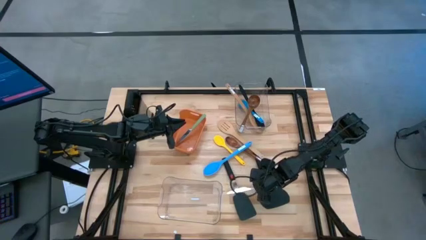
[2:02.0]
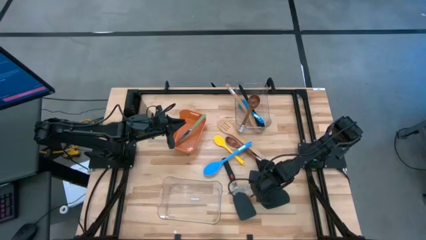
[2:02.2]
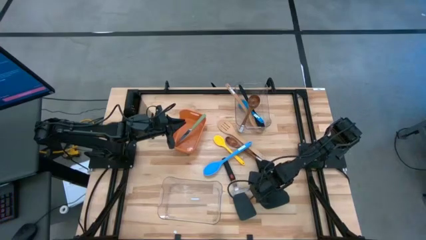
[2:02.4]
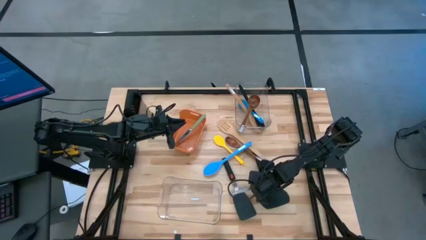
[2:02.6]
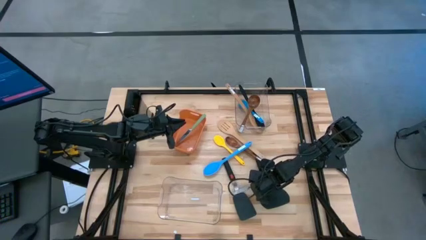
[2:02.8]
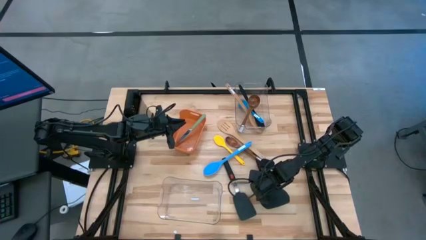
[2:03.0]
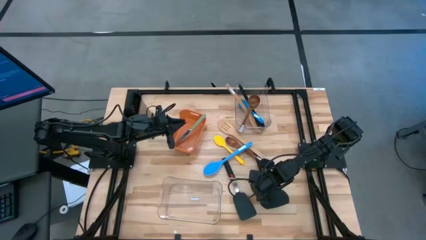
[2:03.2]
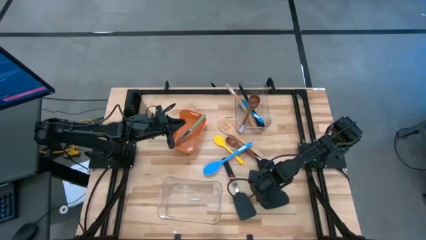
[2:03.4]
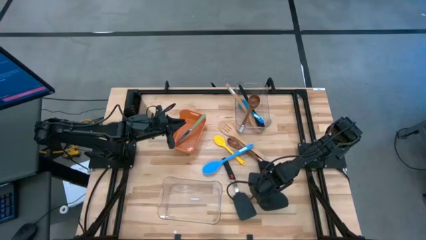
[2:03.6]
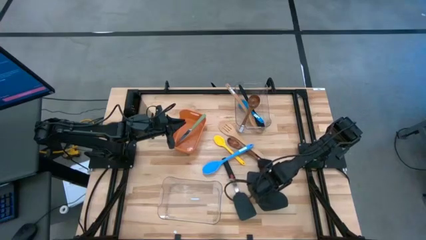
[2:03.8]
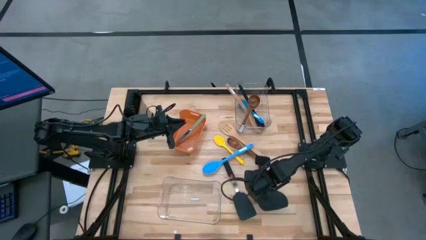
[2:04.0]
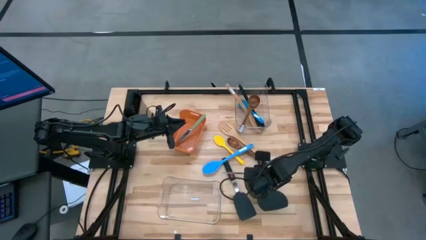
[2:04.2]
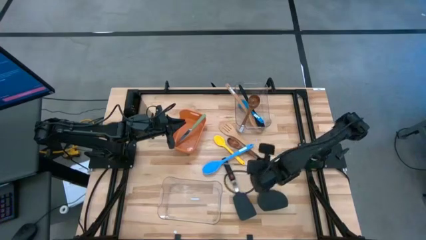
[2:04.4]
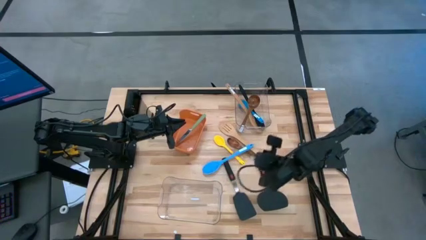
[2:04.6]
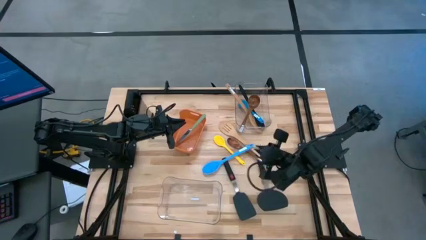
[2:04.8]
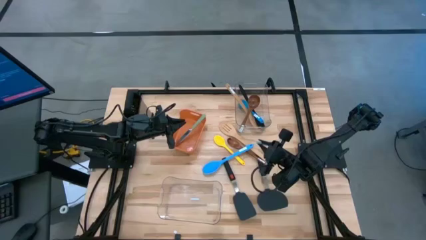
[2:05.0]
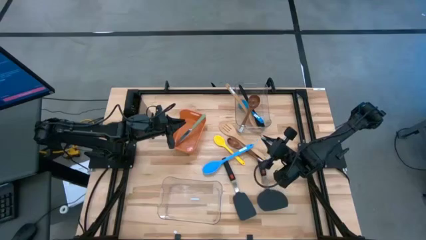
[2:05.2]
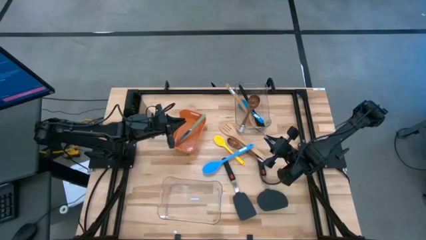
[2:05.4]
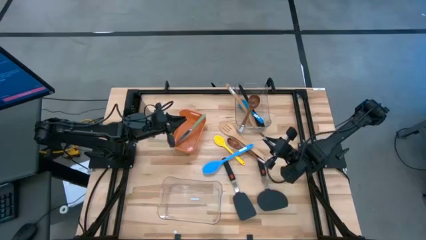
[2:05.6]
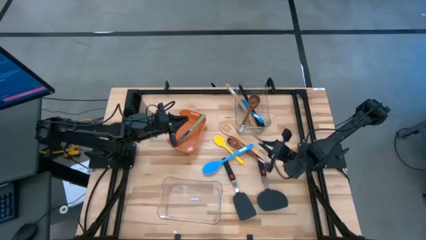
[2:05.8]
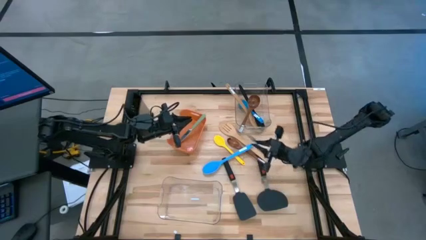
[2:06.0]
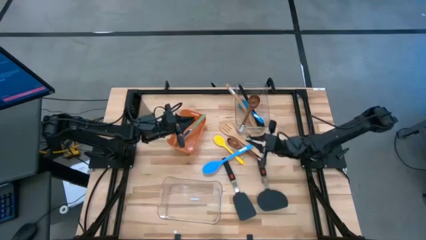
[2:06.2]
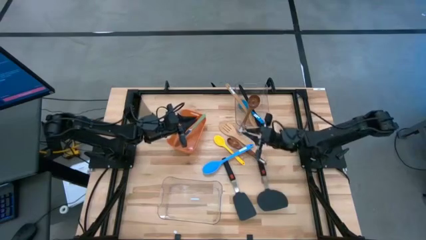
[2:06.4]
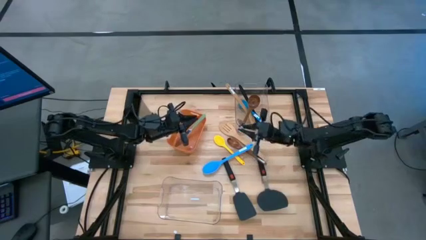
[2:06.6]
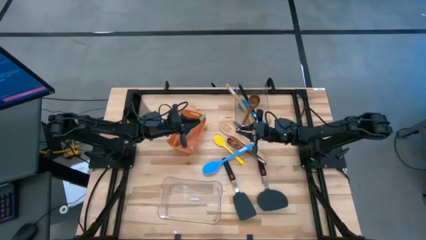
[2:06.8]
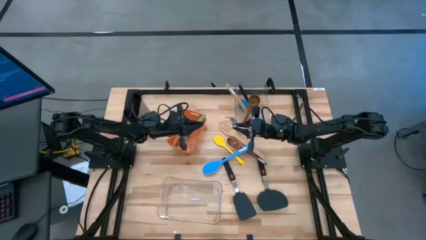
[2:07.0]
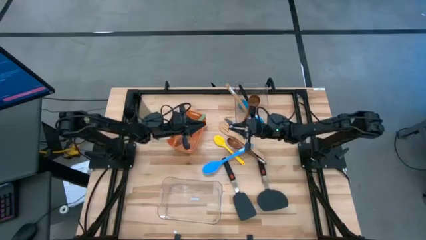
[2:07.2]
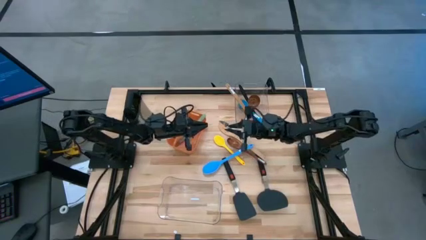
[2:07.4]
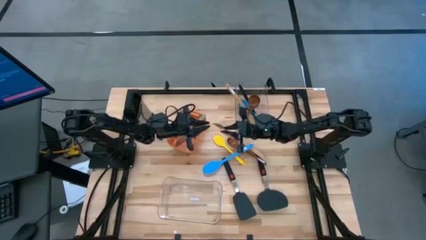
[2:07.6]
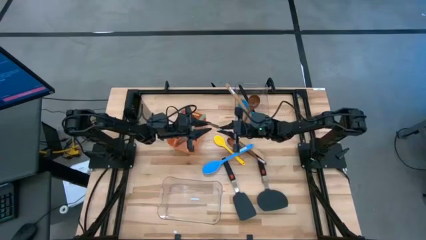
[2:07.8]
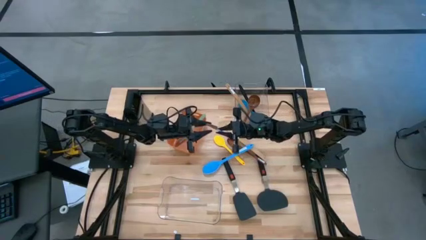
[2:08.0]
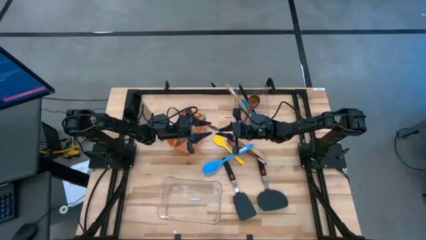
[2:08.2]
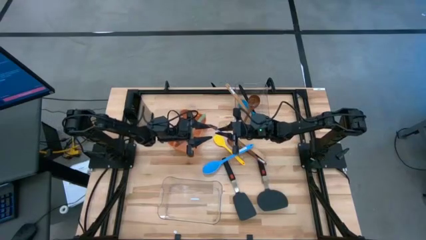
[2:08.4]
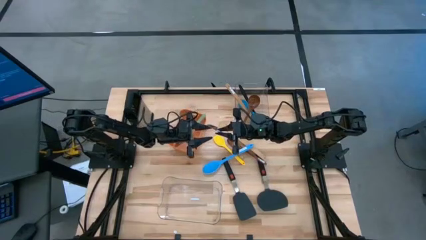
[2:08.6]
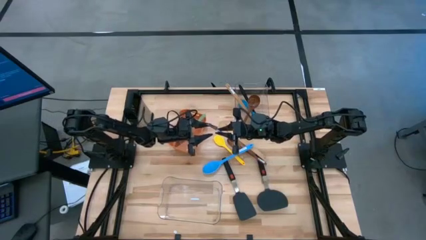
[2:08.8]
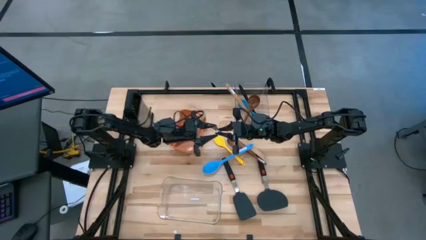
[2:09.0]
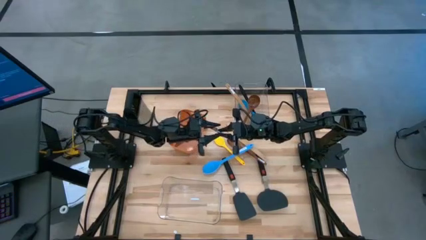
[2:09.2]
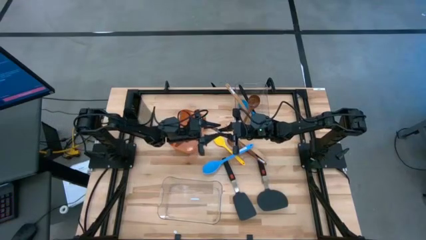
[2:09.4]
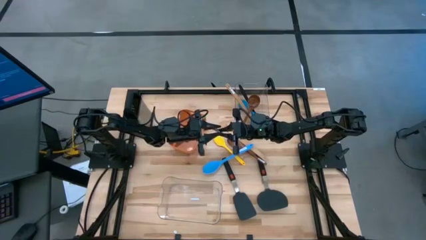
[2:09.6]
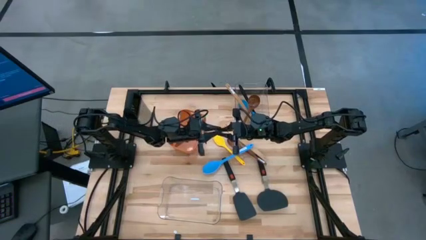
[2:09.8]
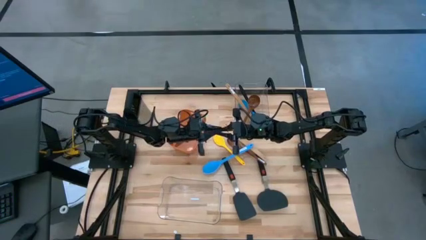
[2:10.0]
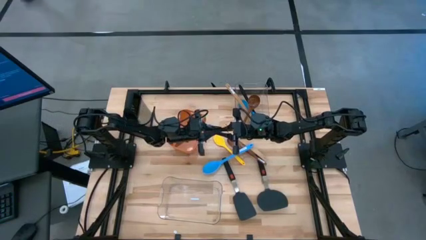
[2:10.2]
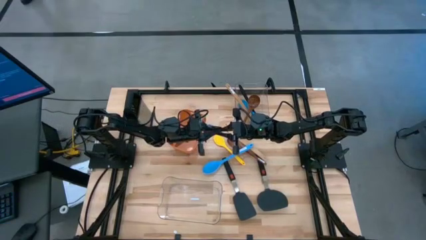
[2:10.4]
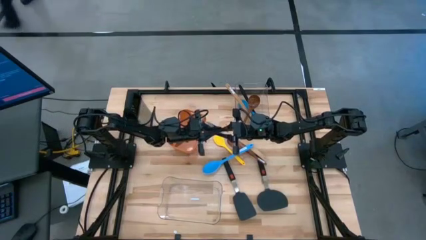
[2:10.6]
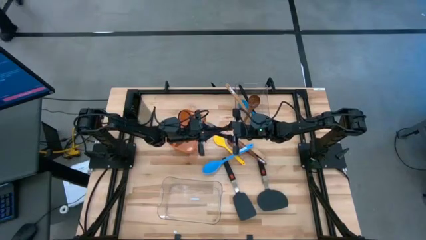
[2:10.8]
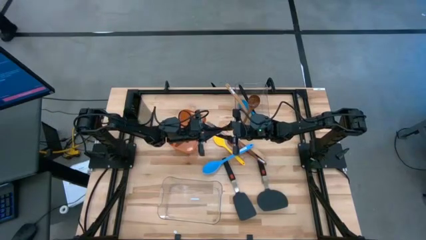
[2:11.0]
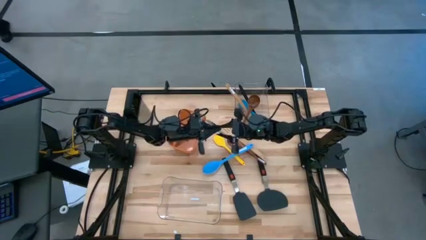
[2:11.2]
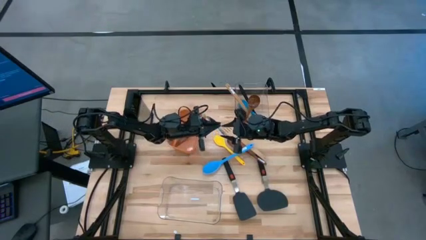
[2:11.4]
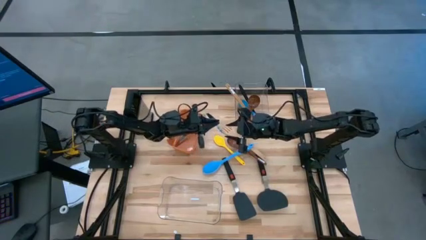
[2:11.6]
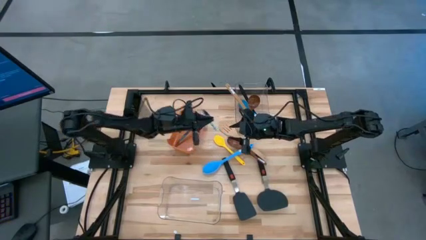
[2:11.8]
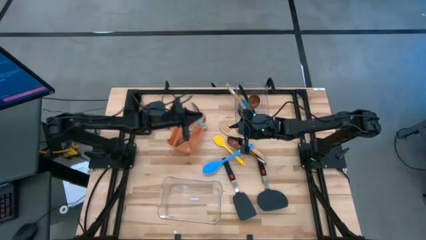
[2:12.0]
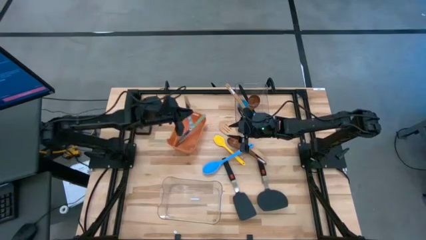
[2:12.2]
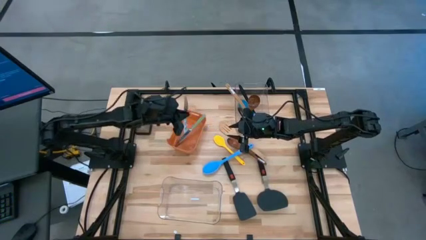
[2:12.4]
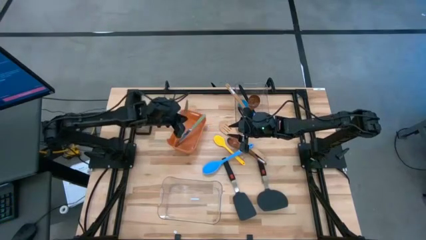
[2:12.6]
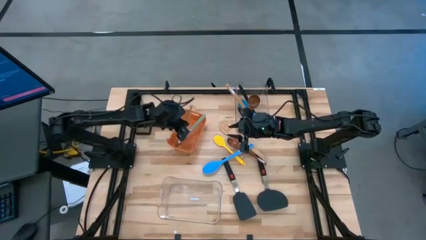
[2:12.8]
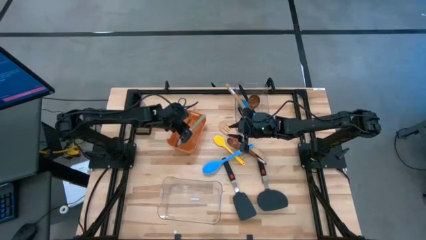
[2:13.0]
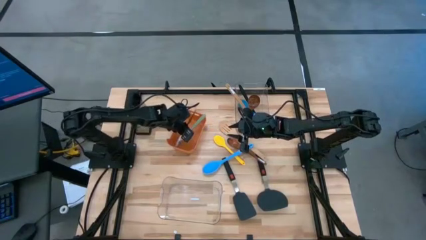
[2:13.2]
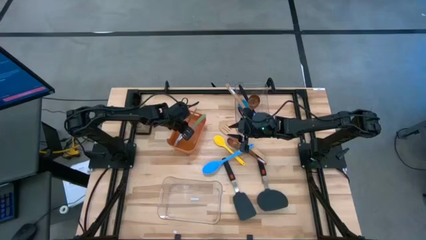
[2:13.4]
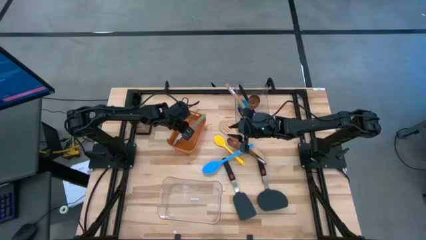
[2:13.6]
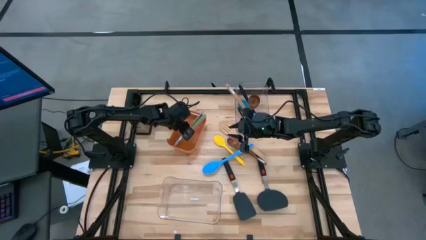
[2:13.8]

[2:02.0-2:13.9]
Task: Pick & Place Kitchen Items
Put the table knife into the orange bin
